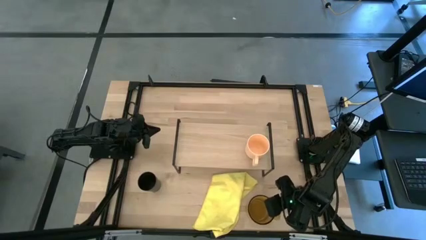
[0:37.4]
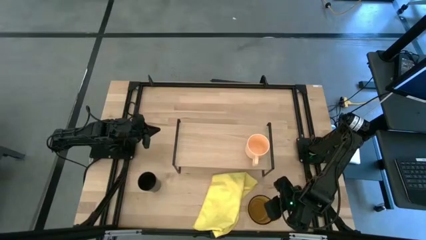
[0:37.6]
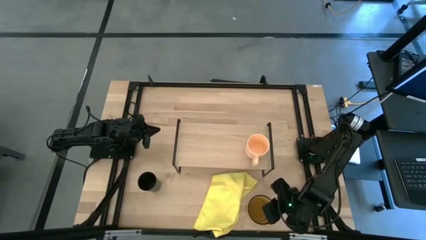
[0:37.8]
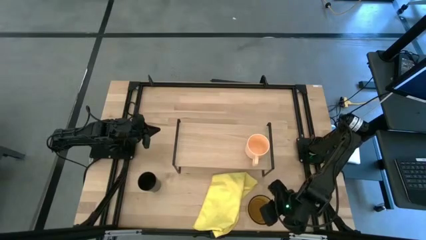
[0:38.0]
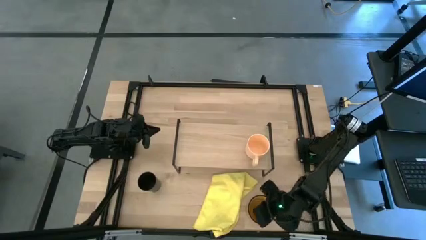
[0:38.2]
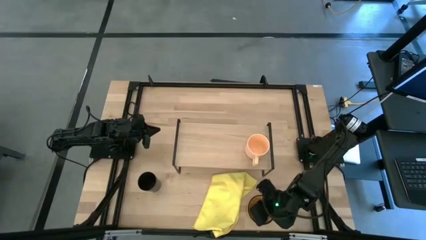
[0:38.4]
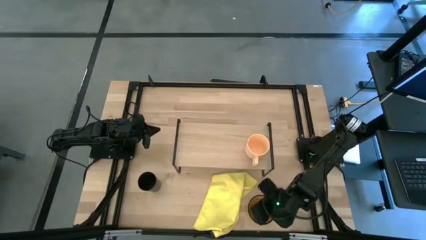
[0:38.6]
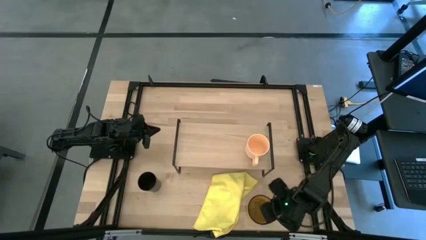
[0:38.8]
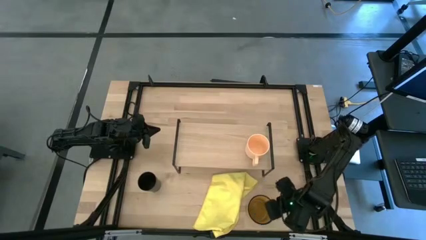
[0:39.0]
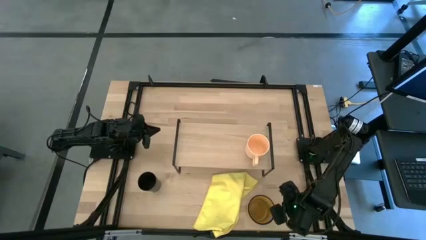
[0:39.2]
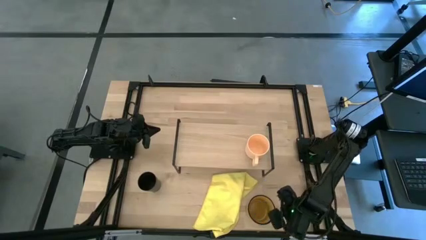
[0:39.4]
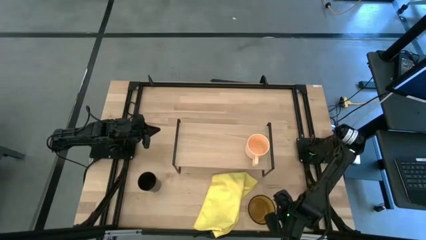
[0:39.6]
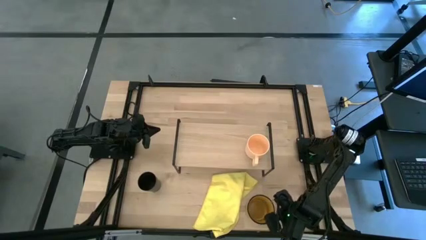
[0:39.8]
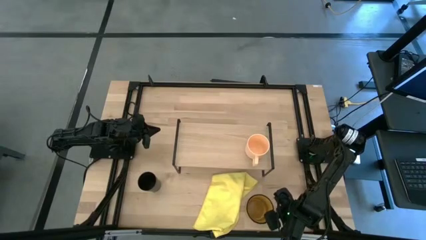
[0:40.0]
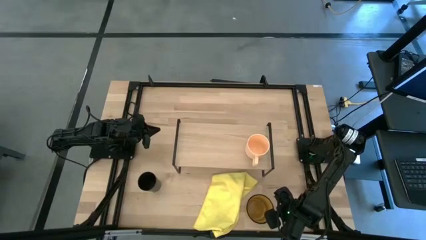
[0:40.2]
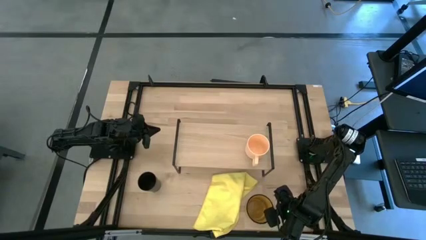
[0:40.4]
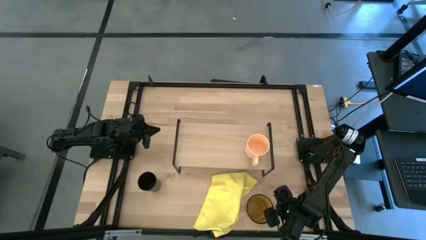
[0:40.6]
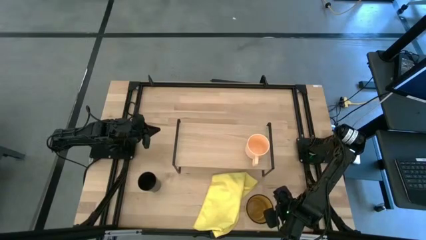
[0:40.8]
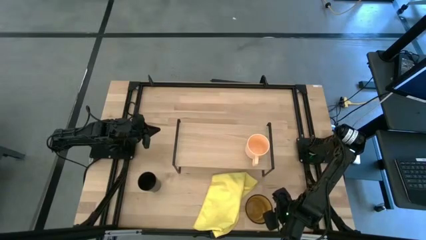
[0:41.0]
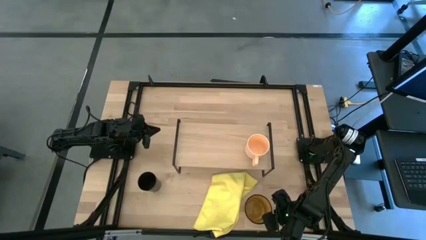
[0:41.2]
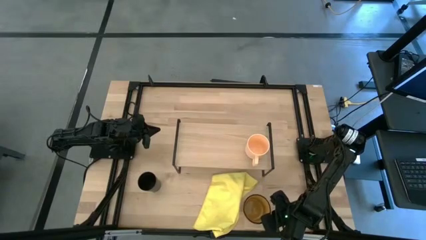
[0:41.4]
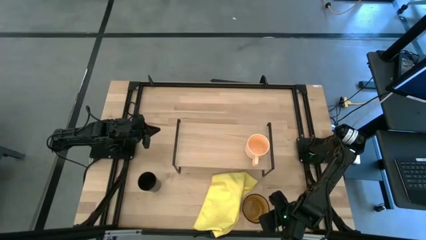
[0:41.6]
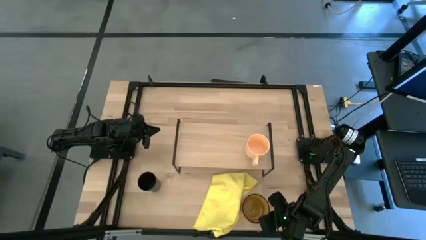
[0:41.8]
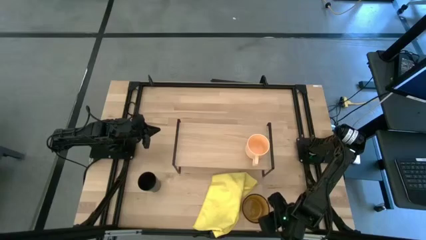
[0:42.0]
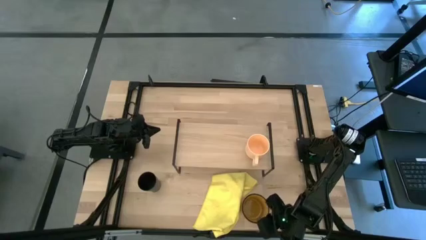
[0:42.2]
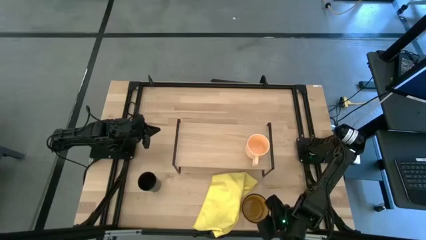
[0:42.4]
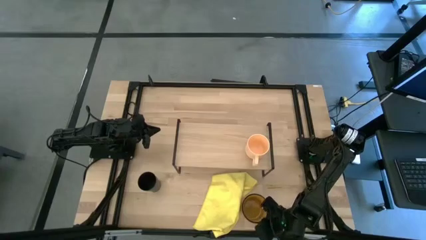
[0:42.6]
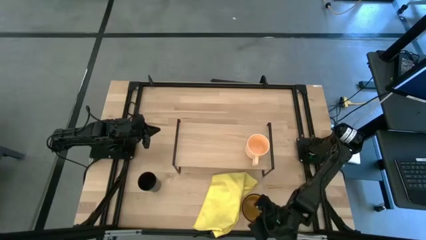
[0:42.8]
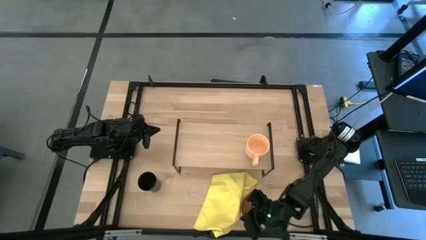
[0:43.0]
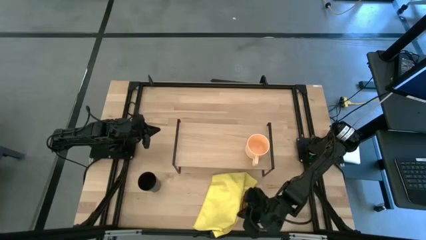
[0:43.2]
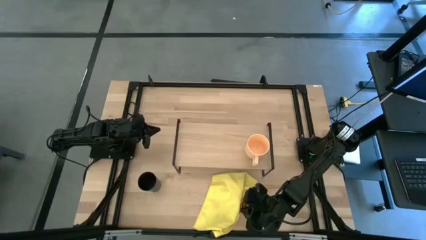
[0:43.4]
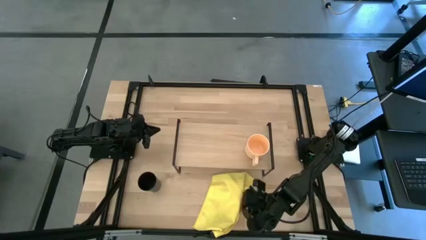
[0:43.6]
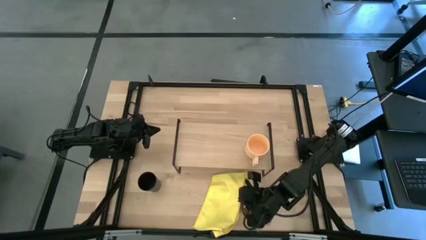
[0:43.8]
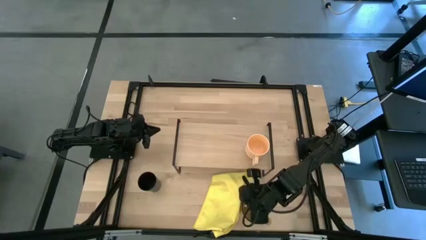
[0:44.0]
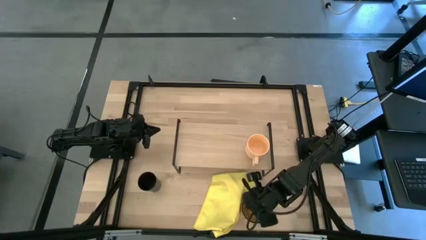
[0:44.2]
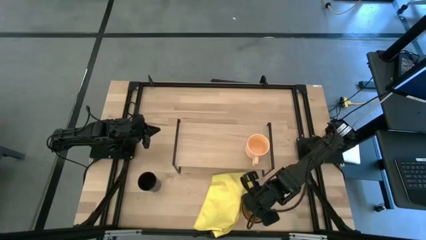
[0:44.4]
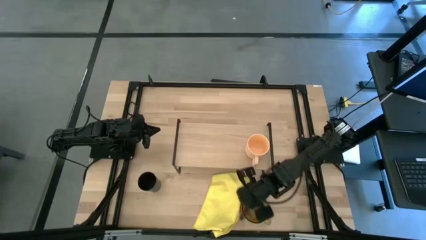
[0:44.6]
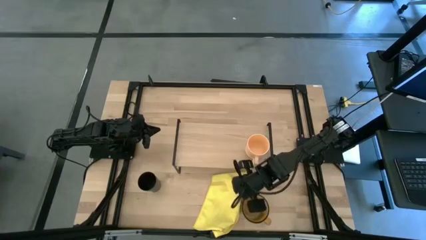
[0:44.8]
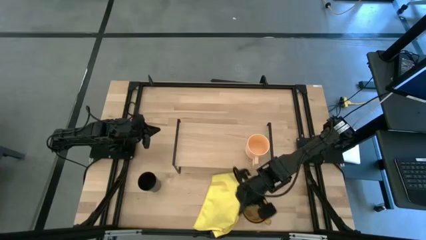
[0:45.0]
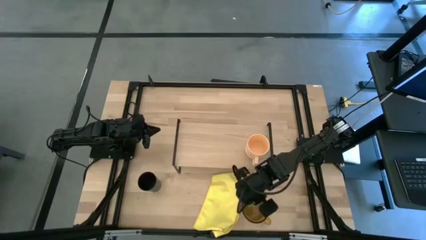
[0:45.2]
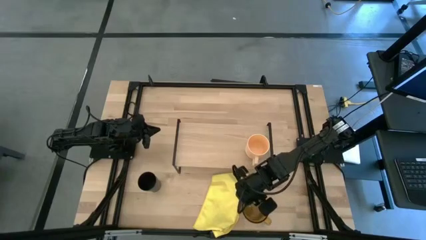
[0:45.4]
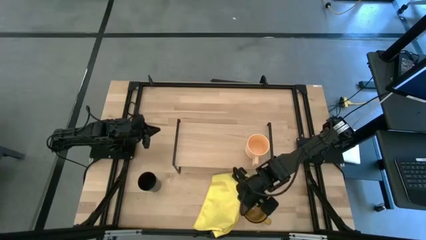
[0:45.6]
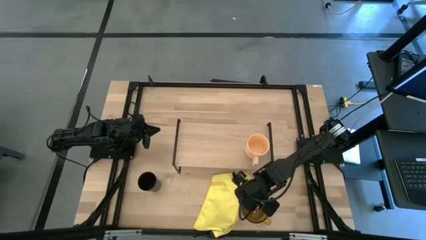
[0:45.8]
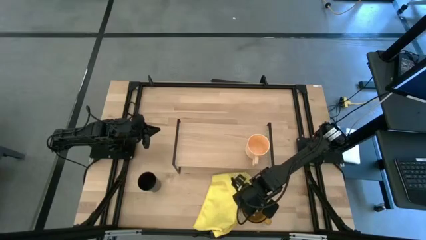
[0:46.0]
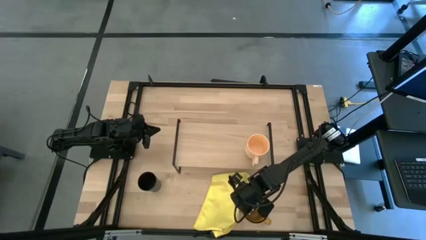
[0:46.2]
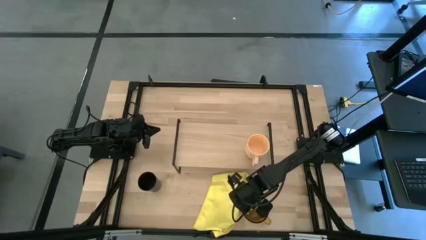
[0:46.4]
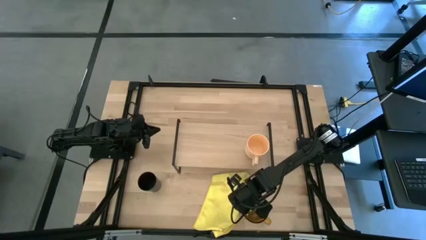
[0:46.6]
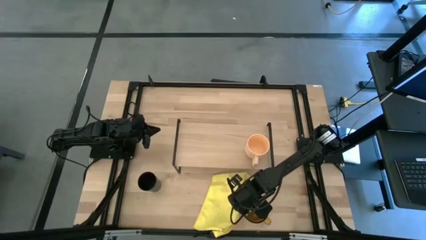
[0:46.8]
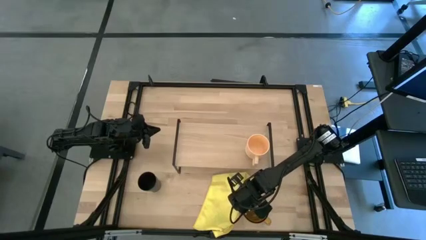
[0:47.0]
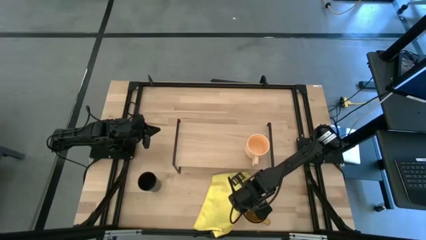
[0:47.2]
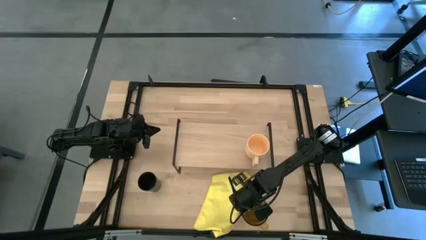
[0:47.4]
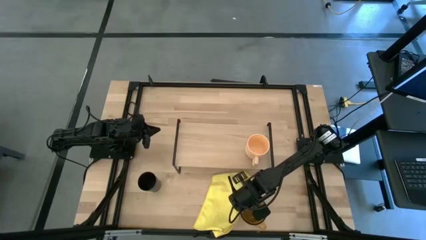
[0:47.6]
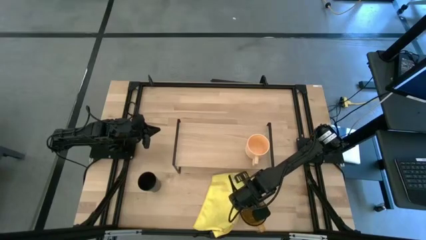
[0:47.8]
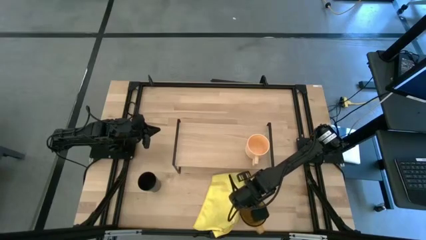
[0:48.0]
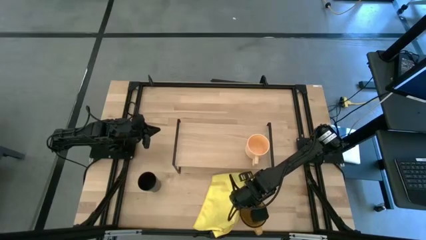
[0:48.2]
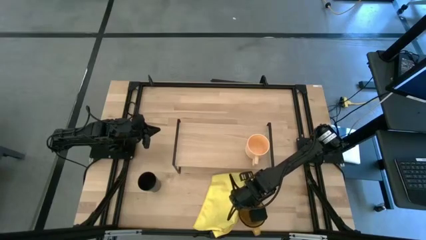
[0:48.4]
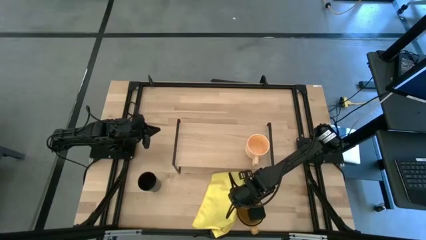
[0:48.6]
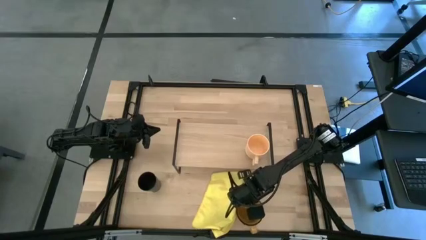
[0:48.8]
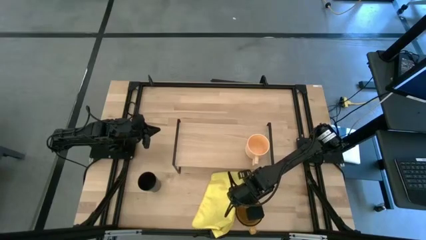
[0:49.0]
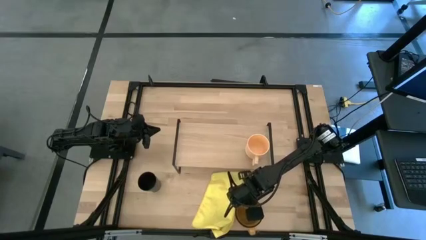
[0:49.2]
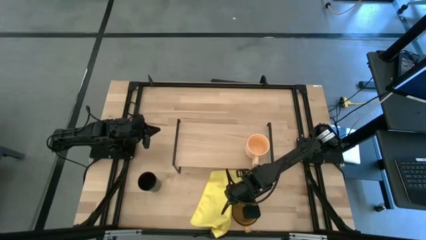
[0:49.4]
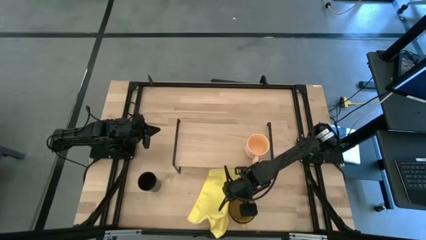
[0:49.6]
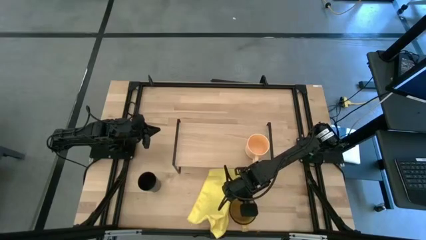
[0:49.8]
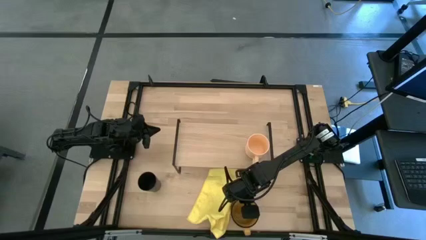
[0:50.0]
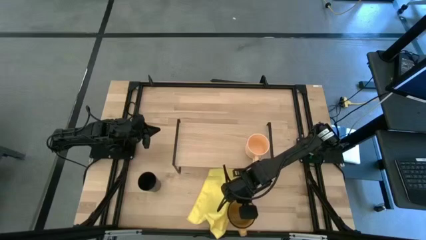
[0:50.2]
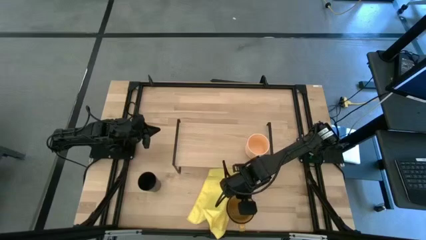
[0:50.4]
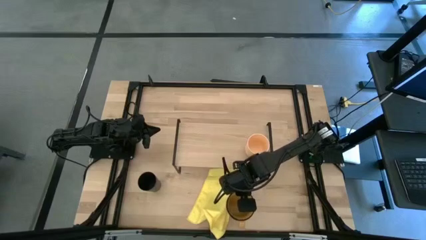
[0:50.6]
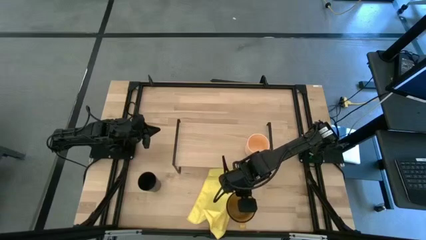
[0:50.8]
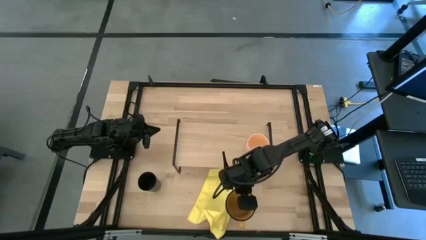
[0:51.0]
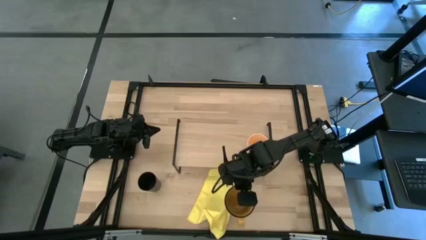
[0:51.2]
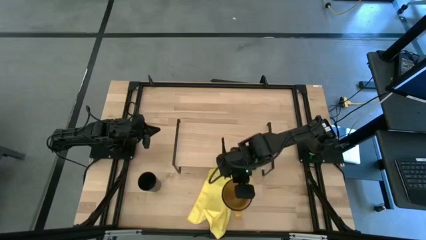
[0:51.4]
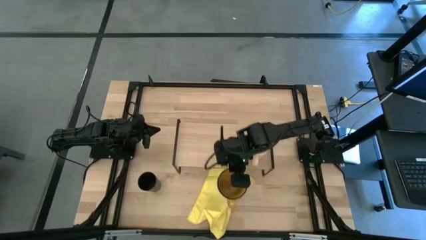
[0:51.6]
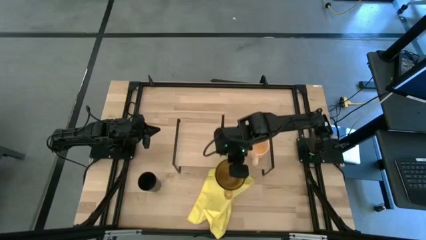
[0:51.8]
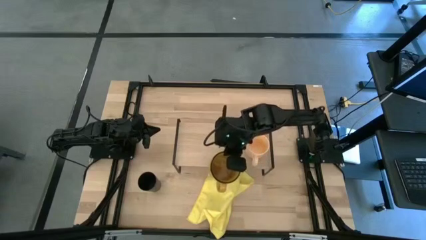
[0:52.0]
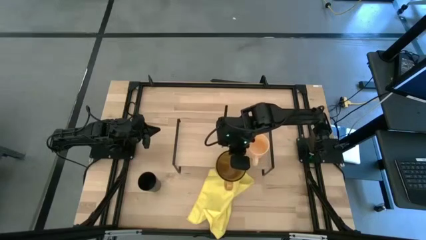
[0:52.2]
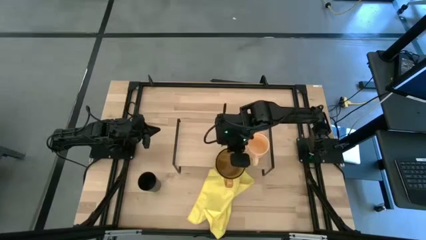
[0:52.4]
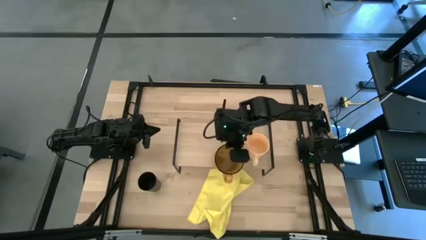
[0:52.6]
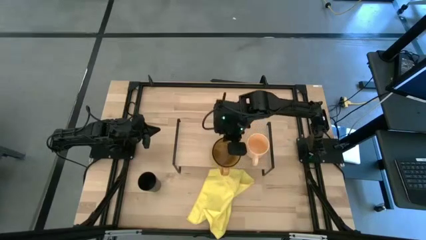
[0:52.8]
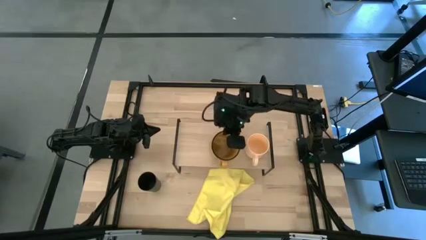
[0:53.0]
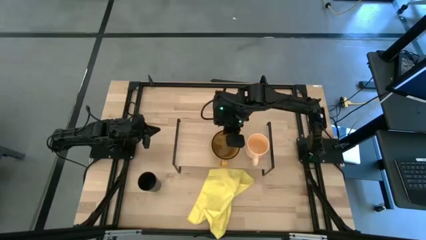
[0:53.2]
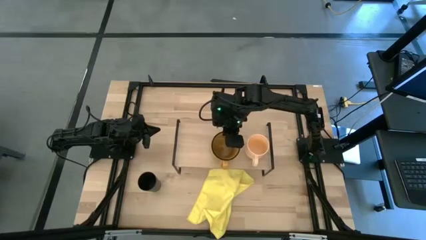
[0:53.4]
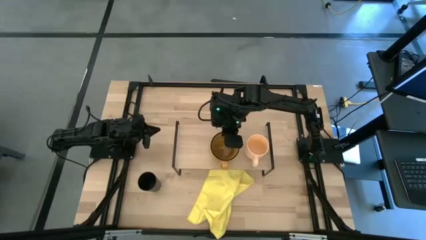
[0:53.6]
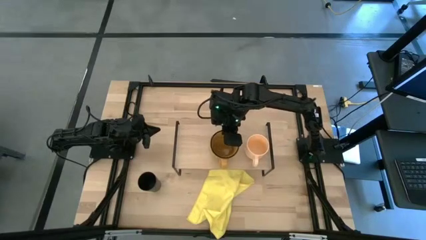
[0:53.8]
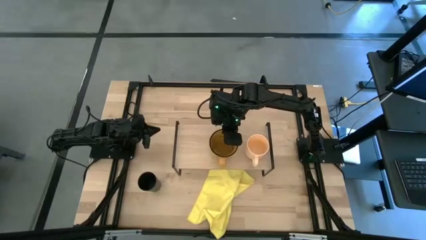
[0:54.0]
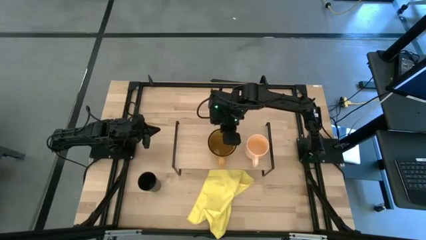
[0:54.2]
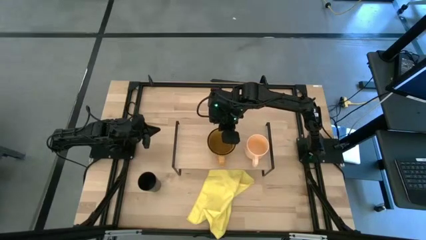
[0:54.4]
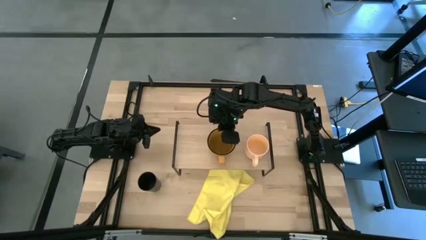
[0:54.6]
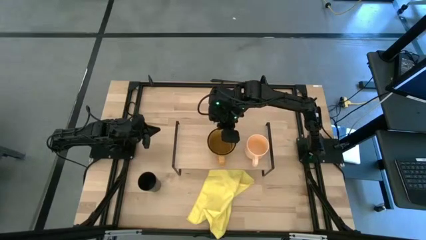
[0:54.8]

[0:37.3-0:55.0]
Task: Stack small to large cups/mugs on shelf
Put the yellow mug on the shelf
